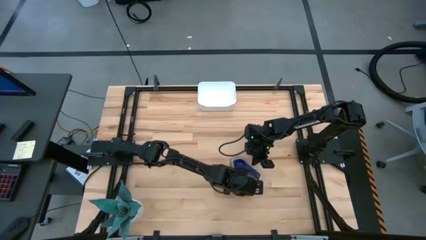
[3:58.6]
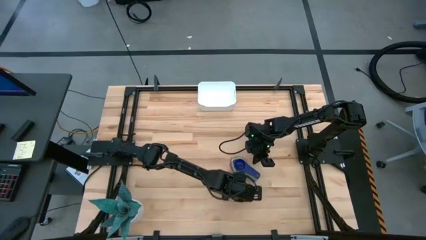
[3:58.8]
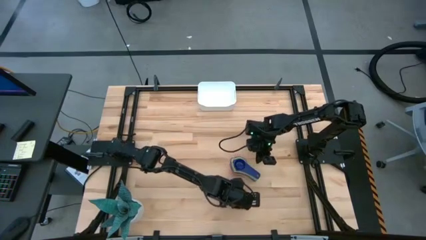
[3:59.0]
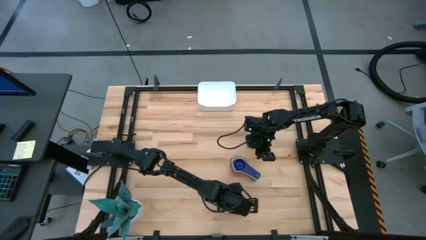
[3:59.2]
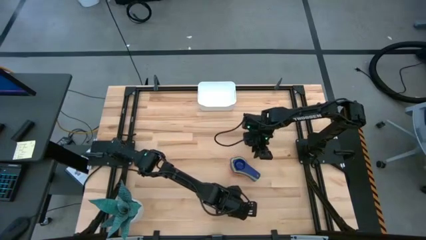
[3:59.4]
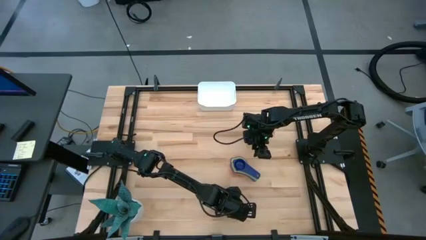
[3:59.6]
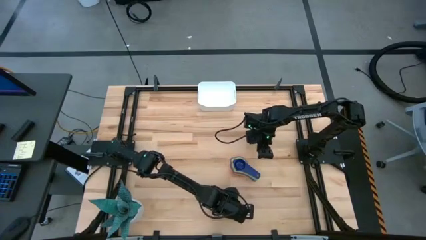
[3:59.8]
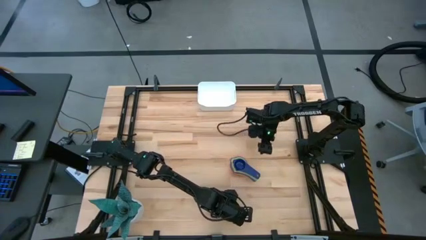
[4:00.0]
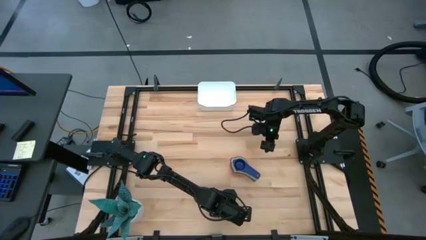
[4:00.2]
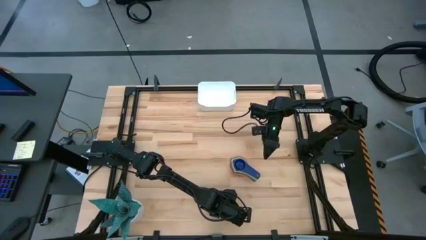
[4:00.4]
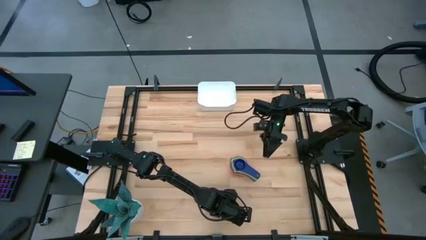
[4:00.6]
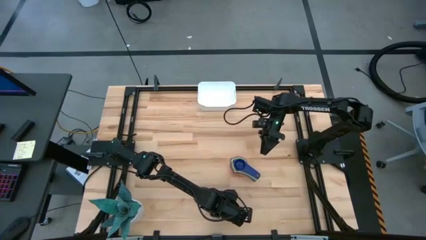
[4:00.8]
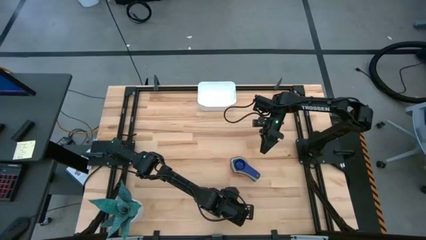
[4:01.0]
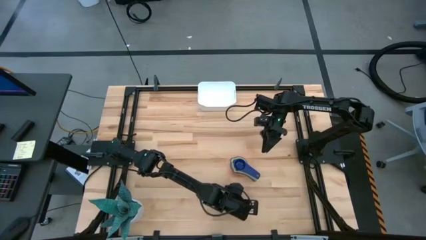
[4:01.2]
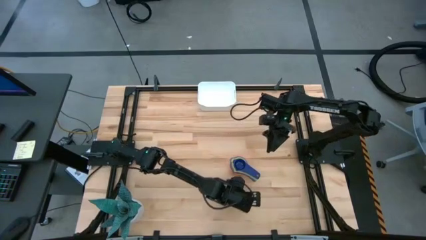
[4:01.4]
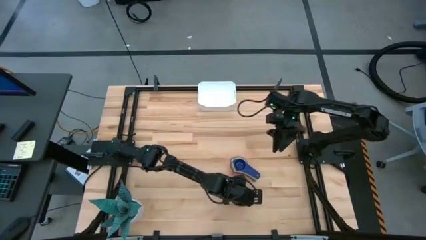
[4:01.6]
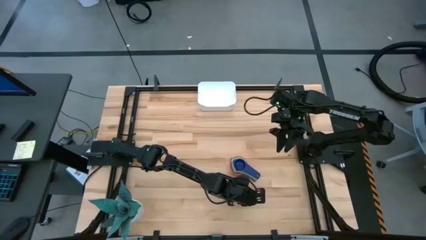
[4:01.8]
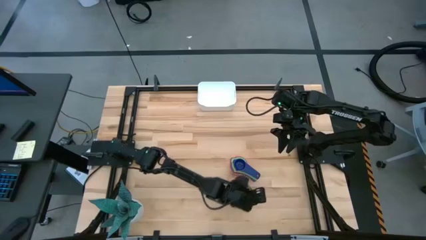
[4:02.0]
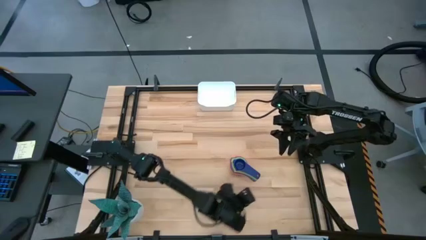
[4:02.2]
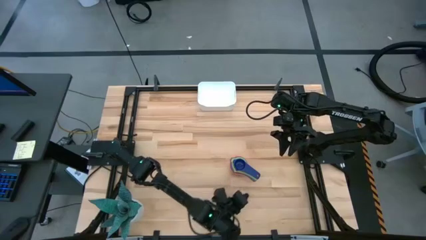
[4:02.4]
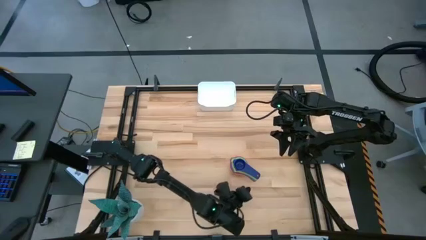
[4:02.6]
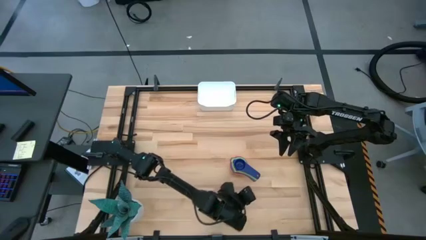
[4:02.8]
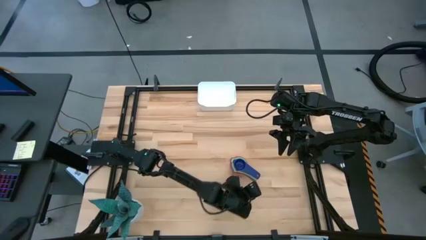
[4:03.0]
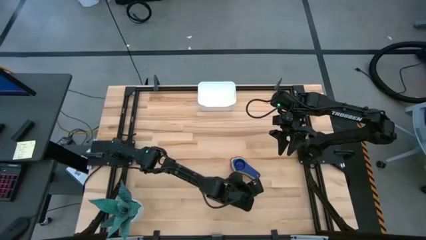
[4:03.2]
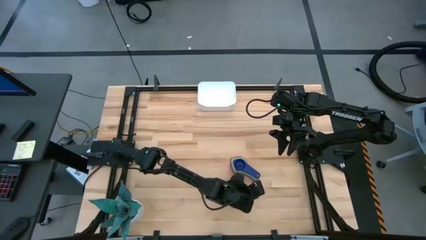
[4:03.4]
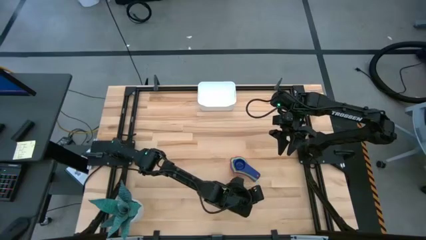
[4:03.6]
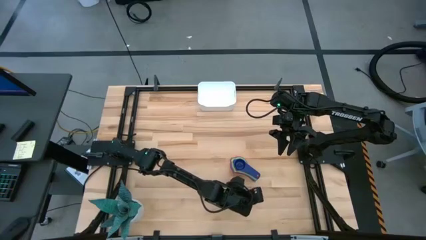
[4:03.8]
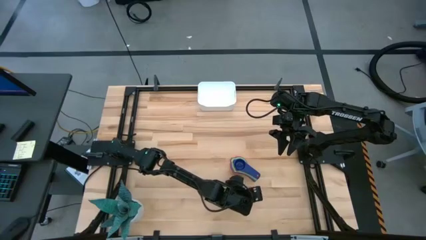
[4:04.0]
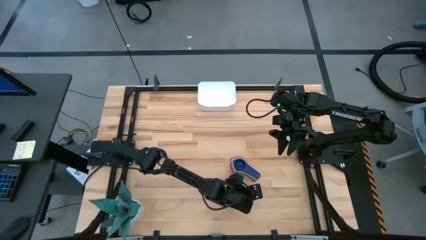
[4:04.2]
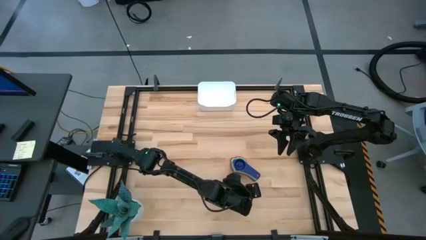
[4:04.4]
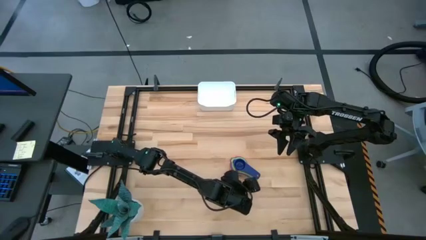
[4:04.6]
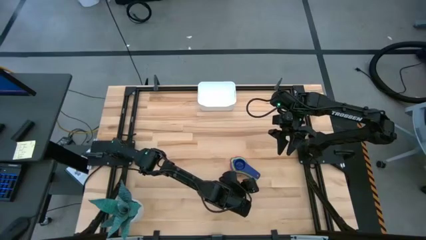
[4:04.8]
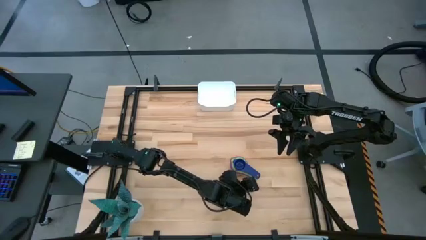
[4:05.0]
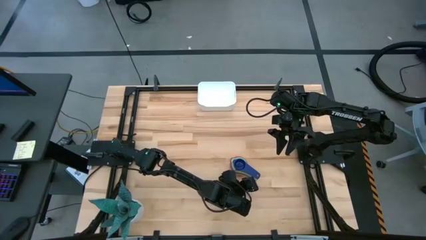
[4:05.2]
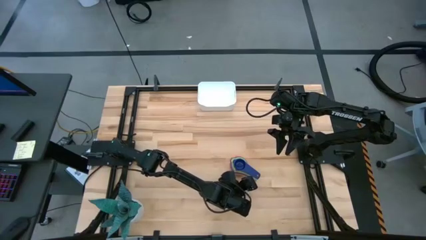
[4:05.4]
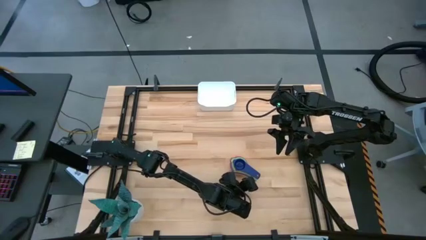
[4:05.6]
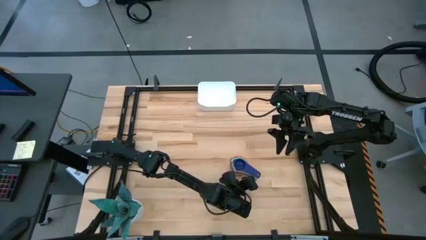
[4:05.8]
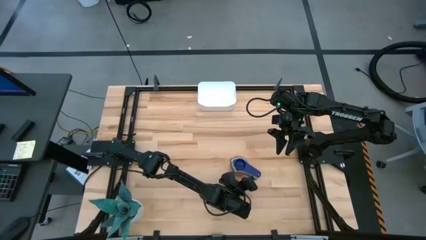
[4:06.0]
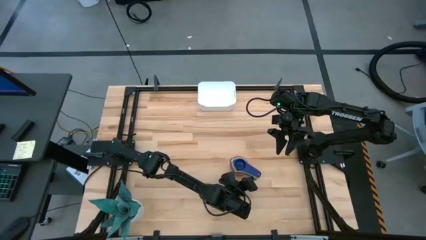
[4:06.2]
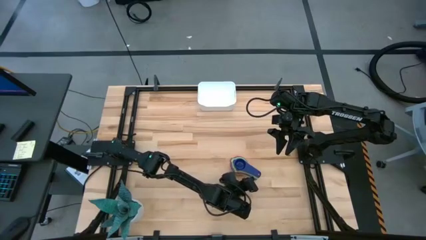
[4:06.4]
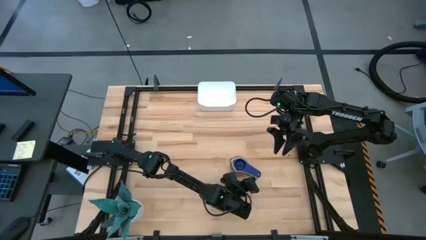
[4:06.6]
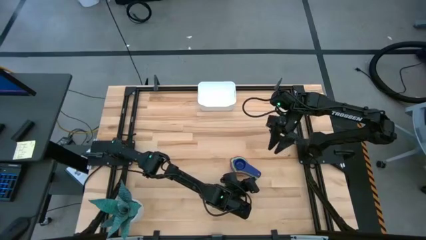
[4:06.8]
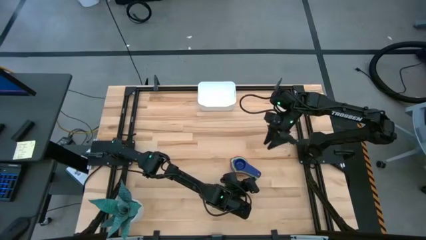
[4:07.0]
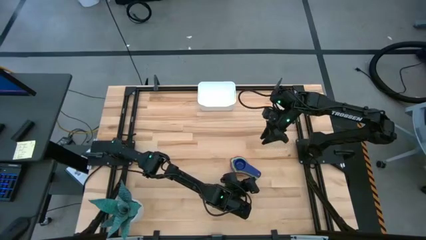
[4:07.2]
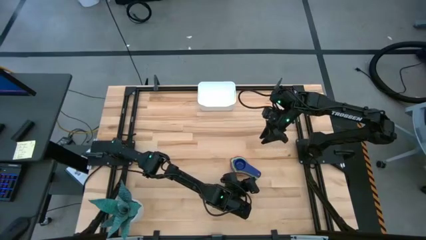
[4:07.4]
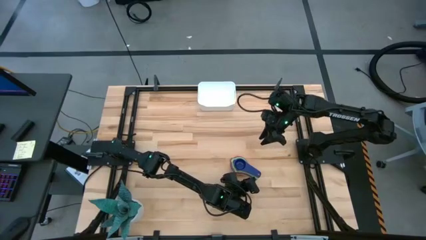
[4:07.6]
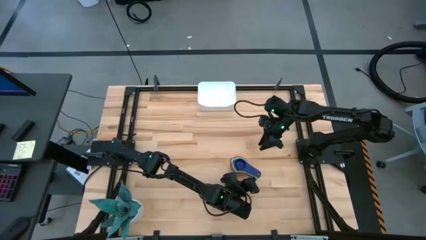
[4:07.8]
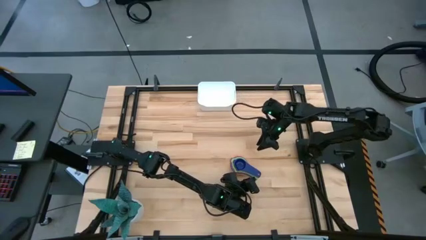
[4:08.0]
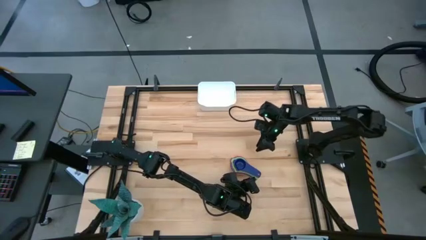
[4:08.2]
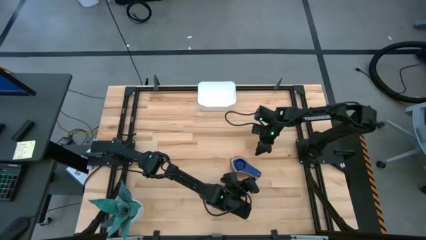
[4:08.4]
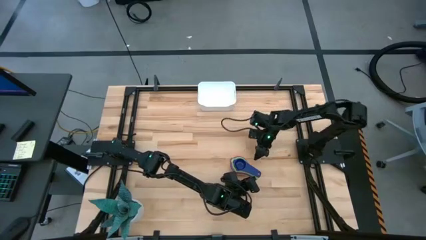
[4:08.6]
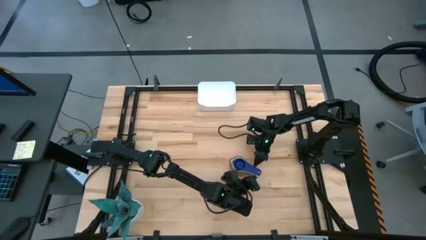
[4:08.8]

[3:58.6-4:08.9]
Task: Nest measuring cups in basket
Put the stacked measuring cups into the white bin

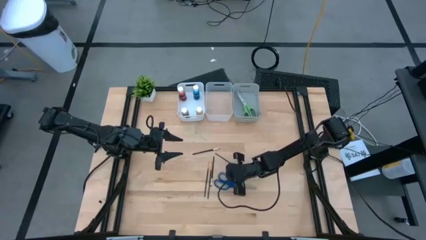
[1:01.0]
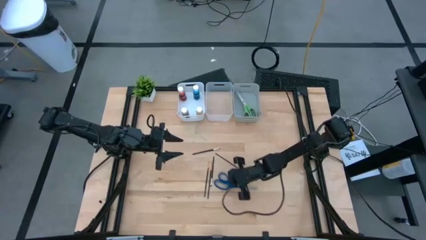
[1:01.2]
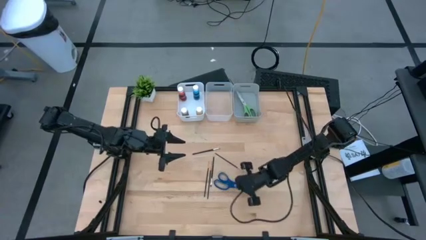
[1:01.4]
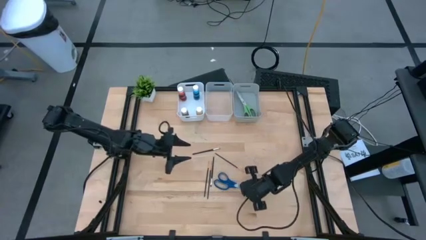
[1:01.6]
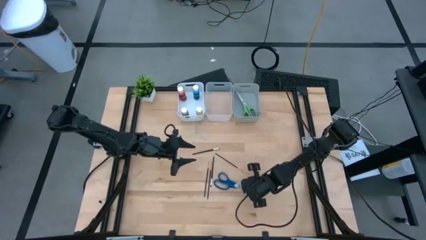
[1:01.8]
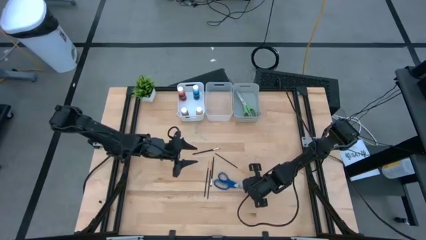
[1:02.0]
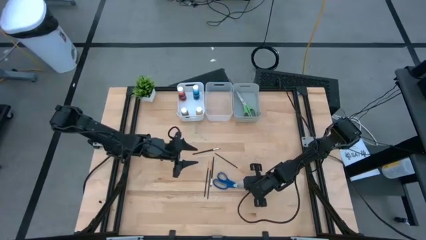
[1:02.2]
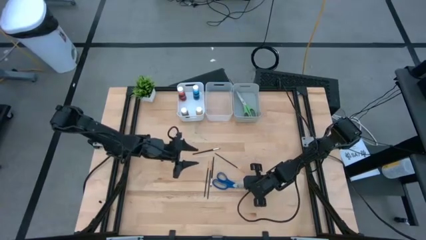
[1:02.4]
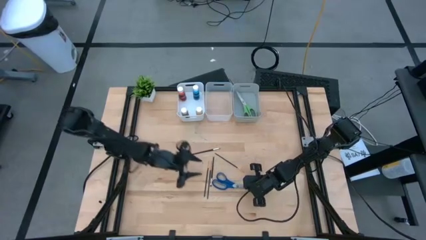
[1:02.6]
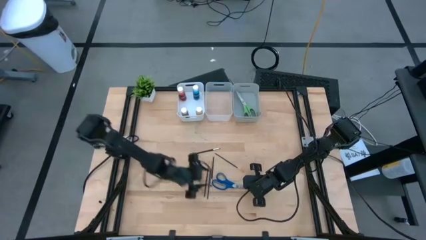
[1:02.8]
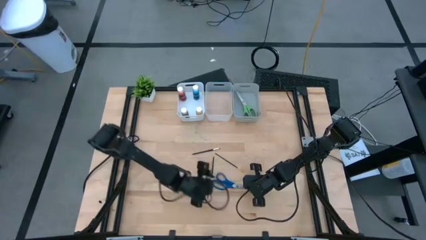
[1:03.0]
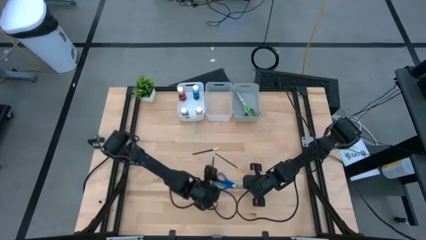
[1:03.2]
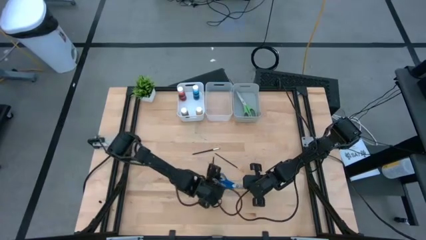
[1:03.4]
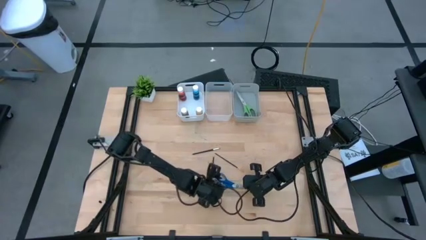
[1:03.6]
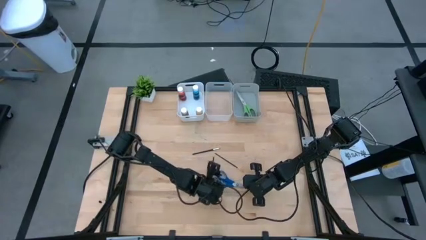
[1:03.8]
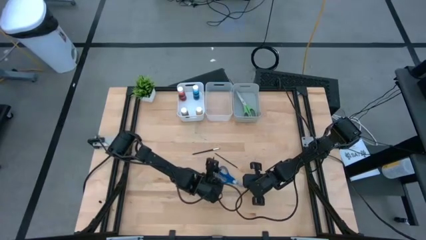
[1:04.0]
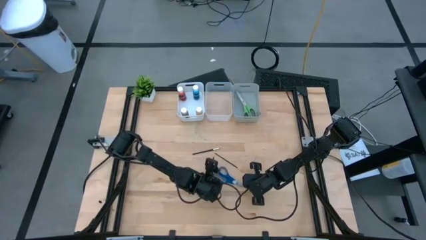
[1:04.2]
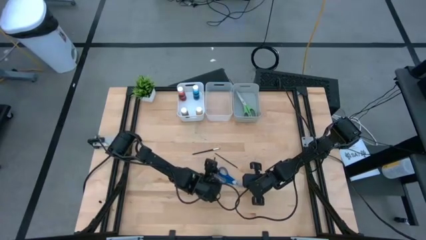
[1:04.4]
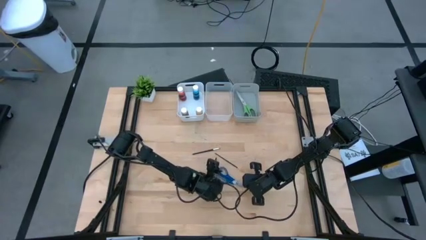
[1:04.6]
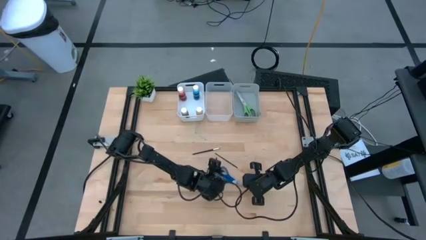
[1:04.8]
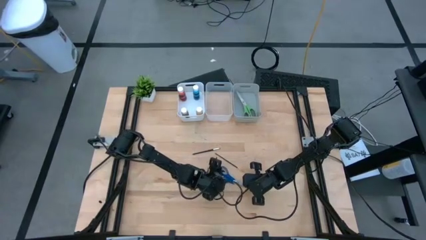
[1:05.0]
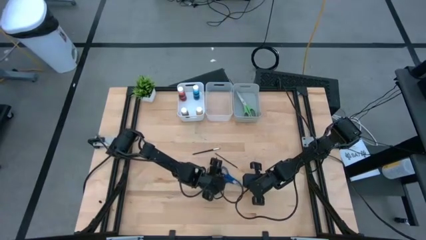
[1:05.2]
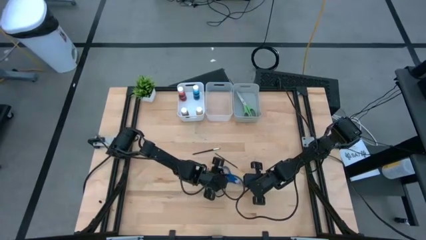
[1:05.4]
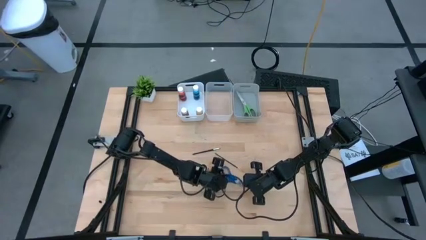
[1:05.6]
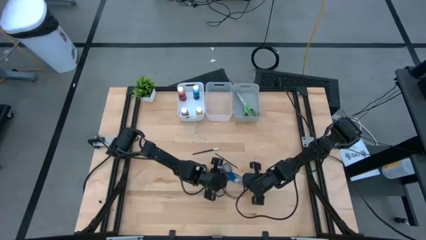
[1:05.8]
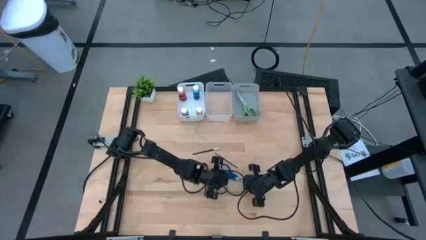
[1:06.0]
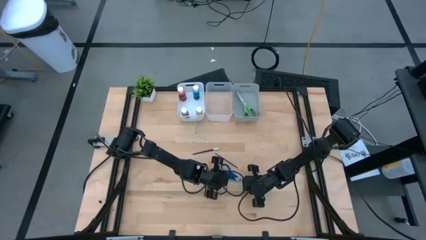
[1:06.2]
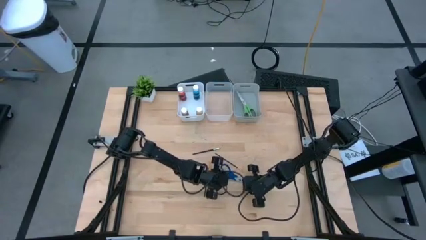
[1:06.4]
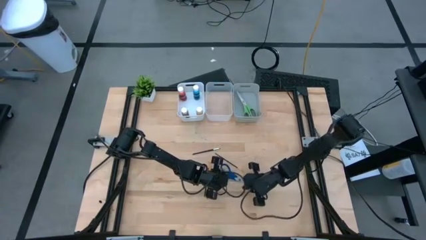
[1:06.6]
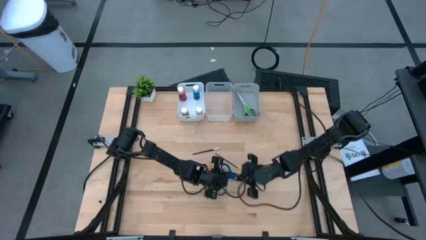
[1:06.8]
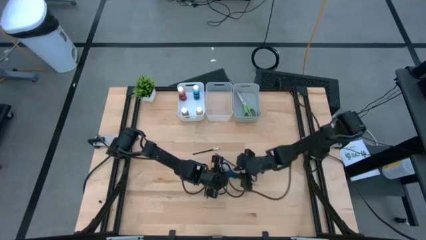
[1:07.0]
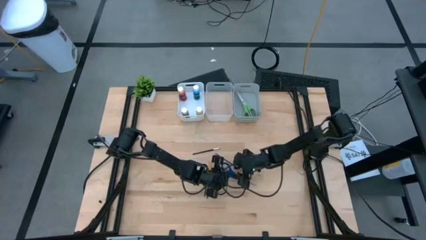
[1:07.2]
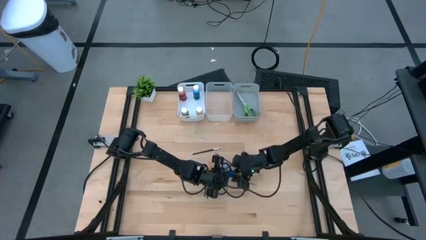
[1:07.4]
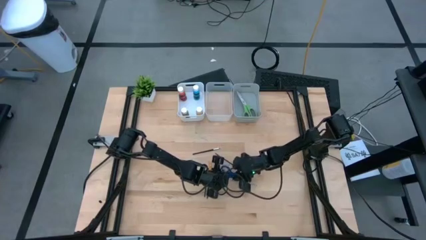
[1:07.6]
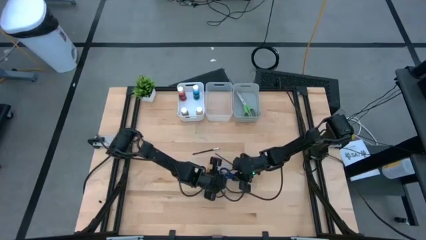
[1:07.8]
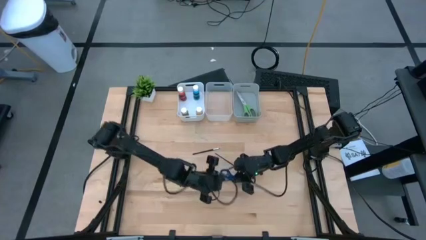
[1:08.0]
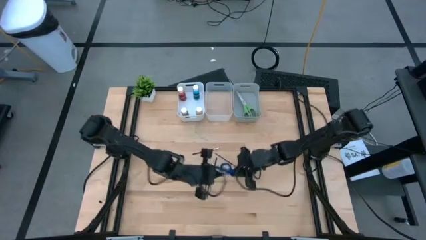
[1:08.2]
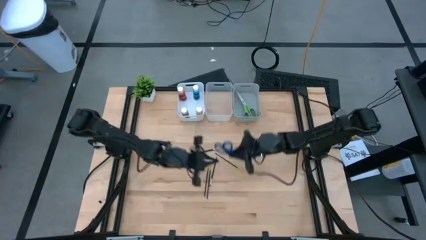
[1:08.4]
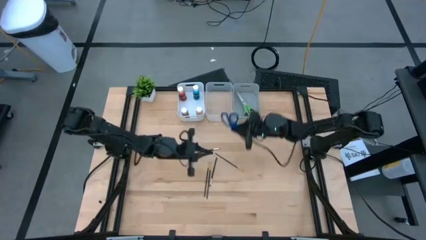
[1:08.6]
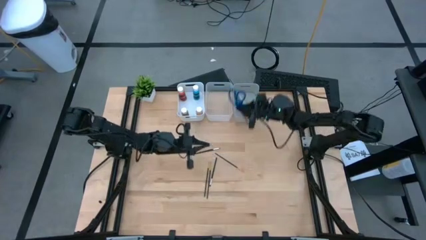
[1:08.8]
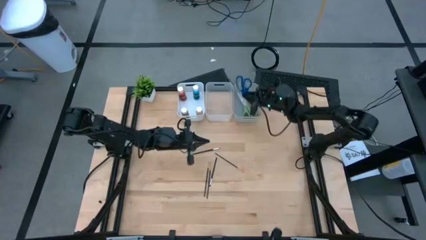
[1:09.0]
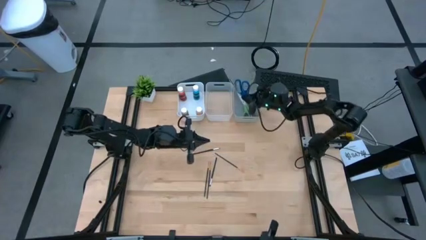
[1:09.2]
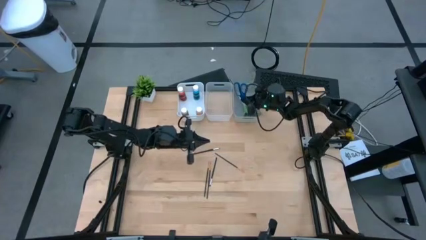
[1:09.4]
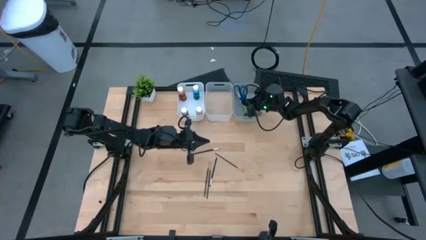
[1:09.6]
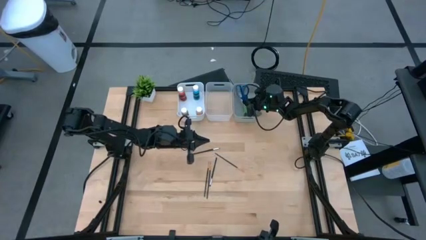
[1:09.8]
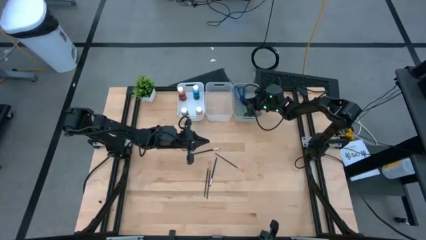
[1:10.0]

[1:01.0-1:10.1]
Task: Pick & Place Paint Supplies
Put the blue scissors into the gray bin
